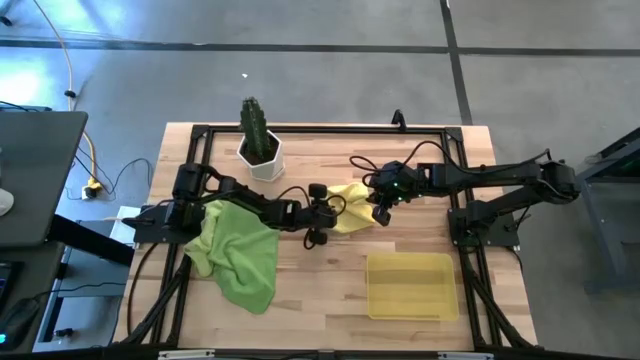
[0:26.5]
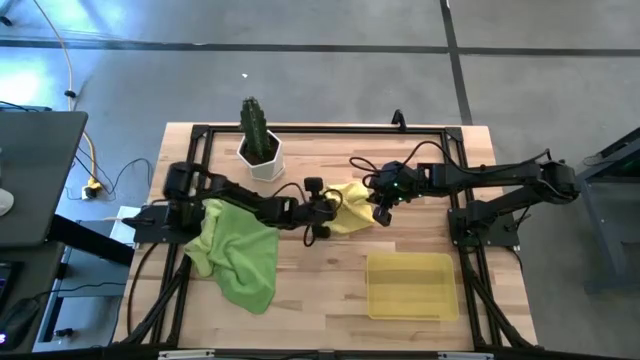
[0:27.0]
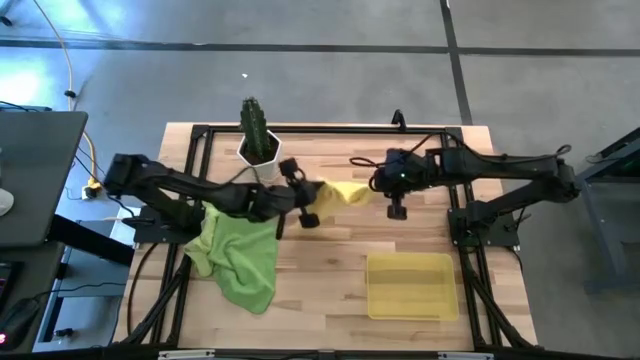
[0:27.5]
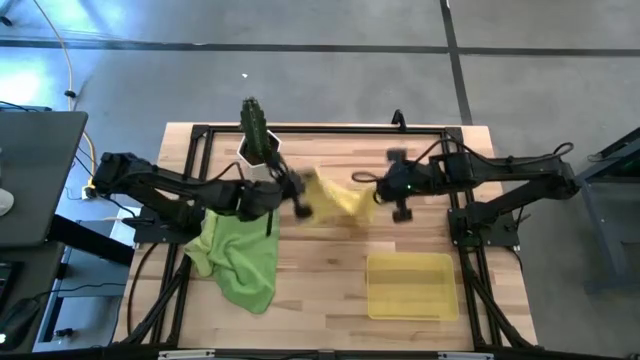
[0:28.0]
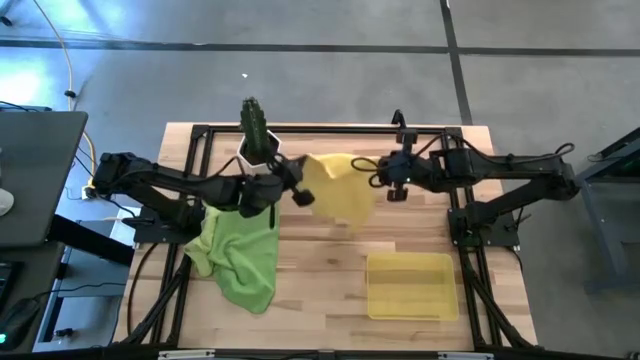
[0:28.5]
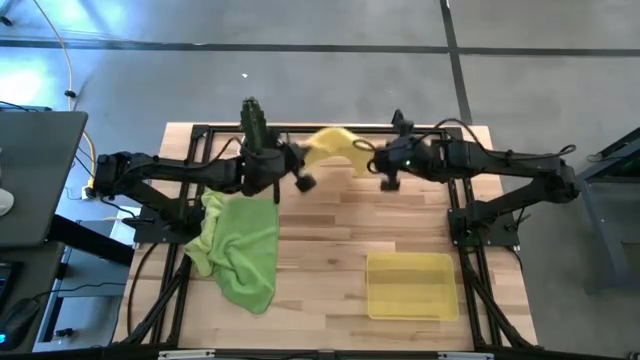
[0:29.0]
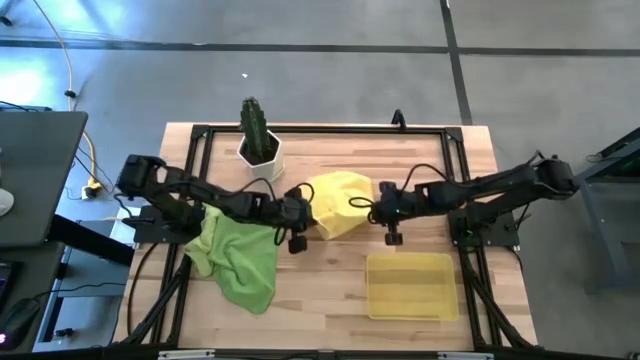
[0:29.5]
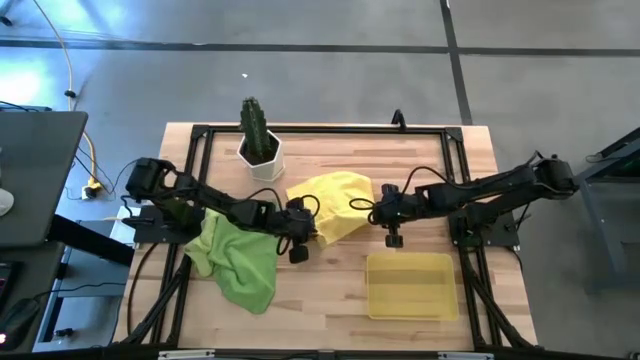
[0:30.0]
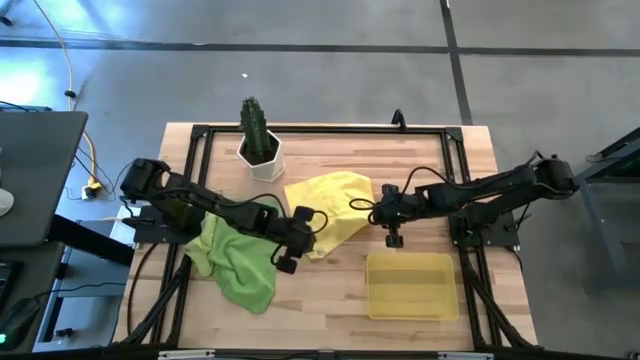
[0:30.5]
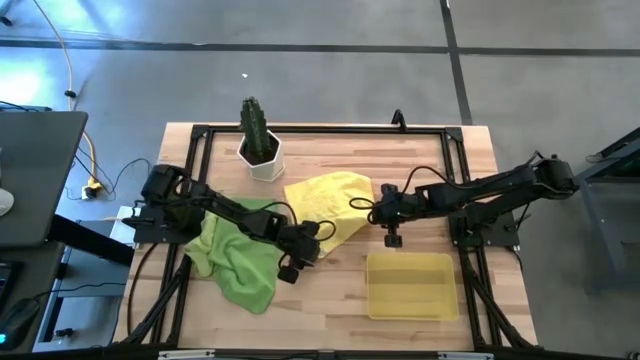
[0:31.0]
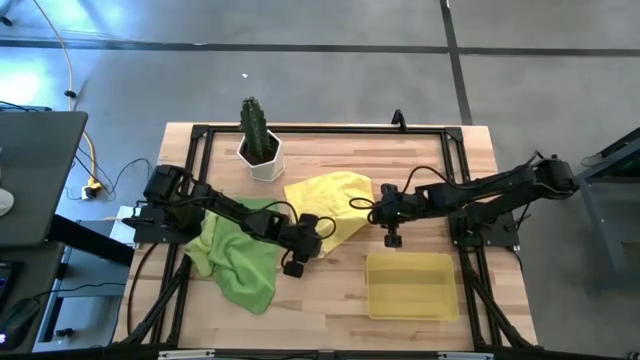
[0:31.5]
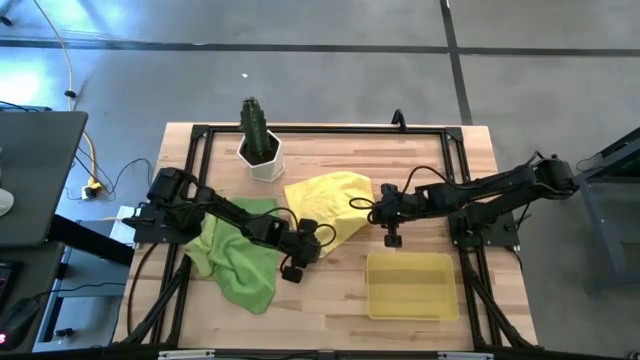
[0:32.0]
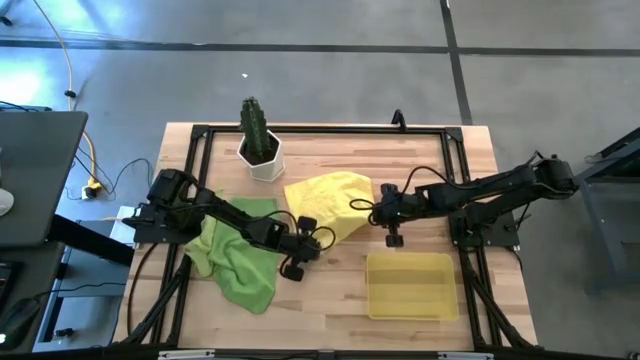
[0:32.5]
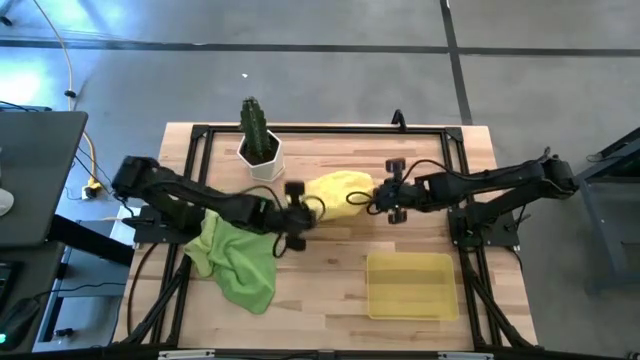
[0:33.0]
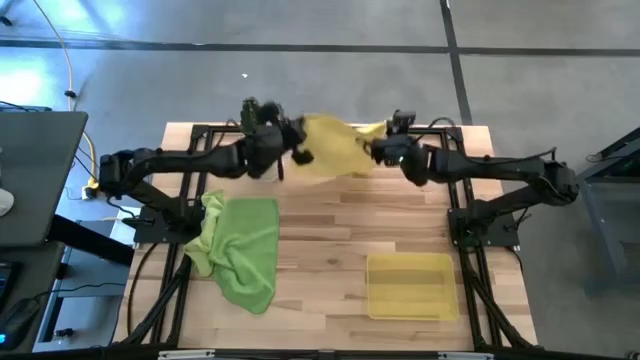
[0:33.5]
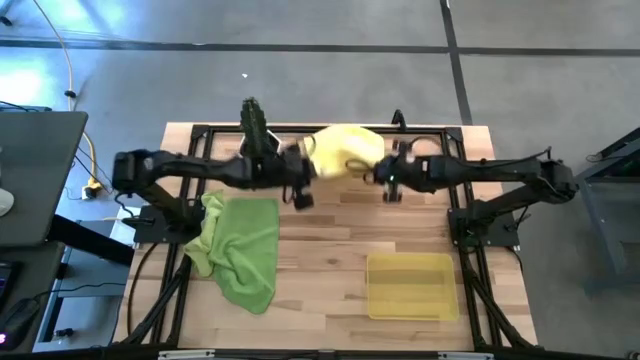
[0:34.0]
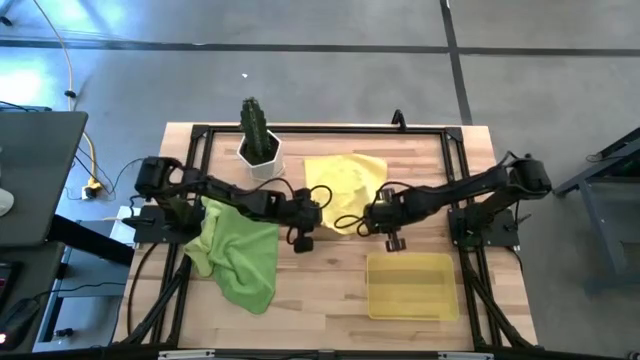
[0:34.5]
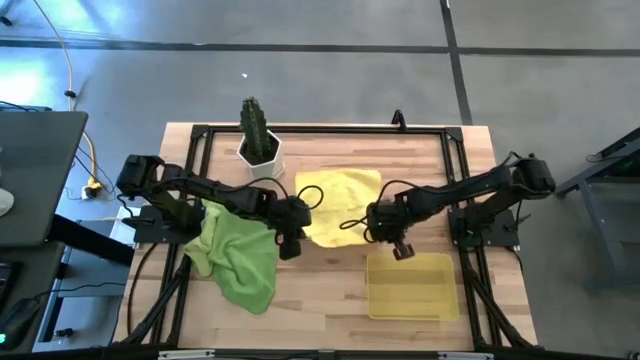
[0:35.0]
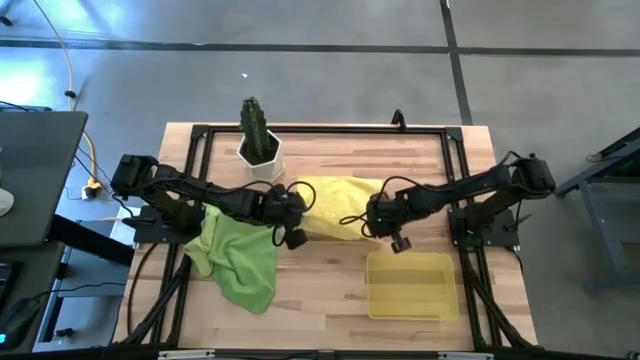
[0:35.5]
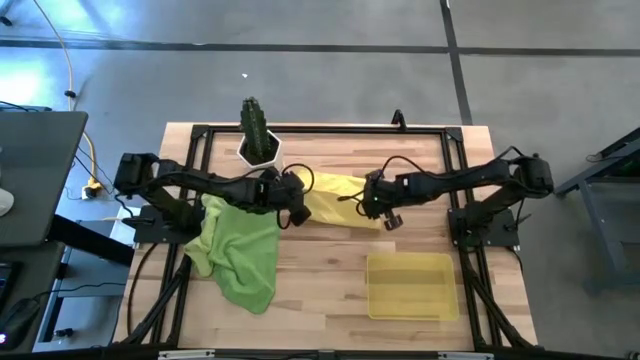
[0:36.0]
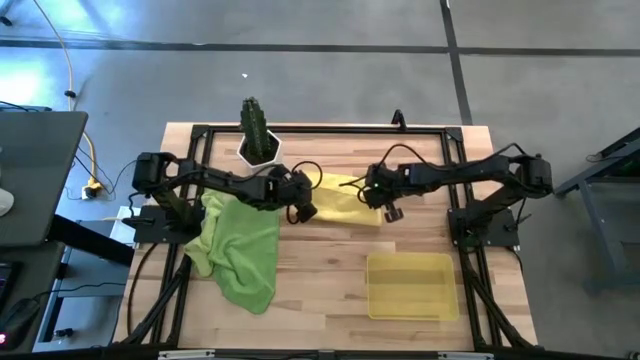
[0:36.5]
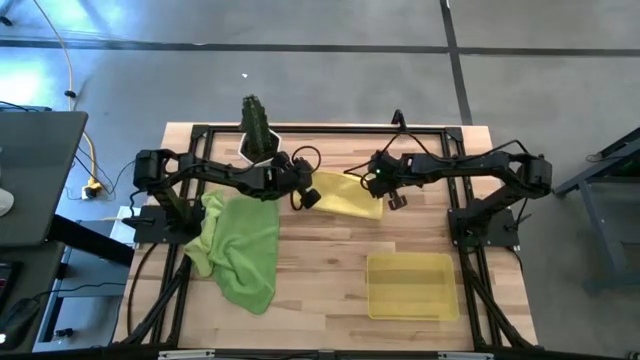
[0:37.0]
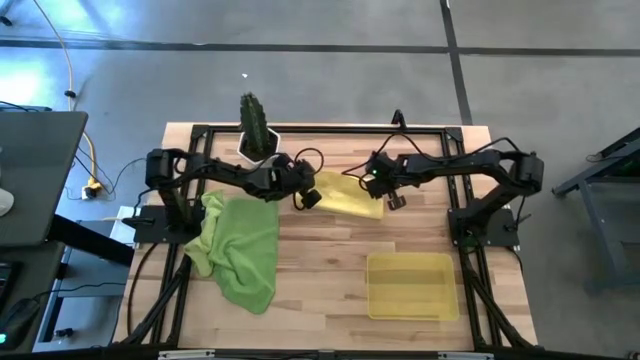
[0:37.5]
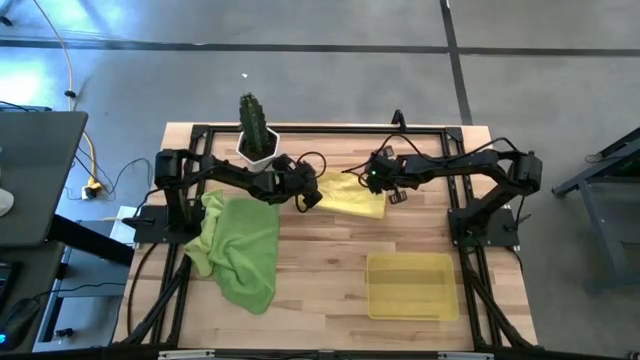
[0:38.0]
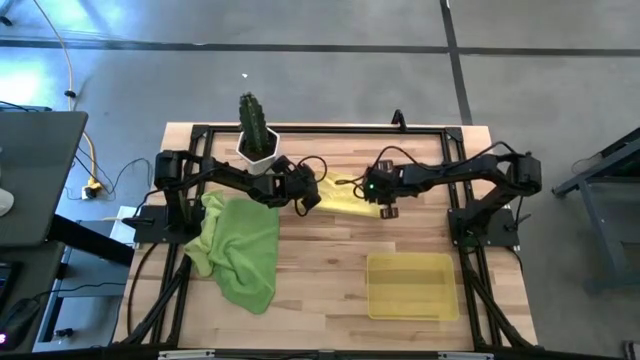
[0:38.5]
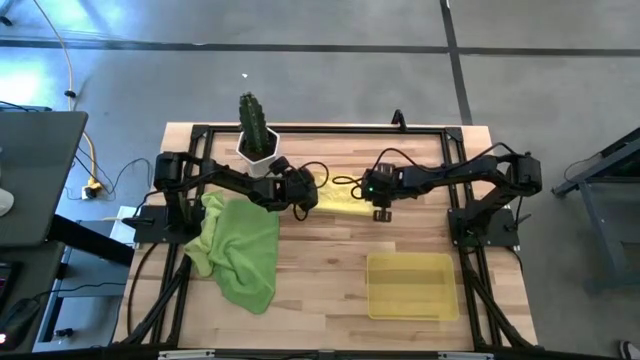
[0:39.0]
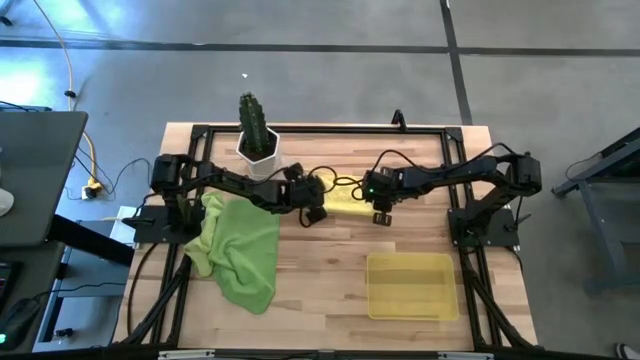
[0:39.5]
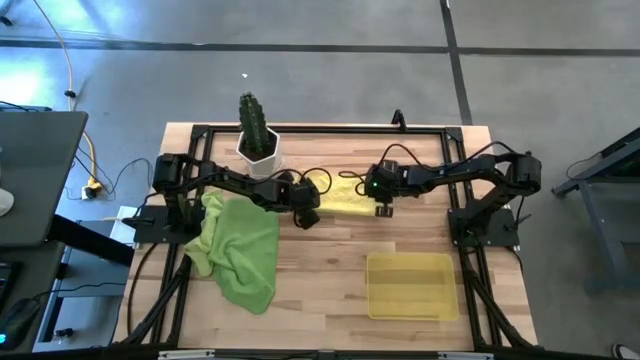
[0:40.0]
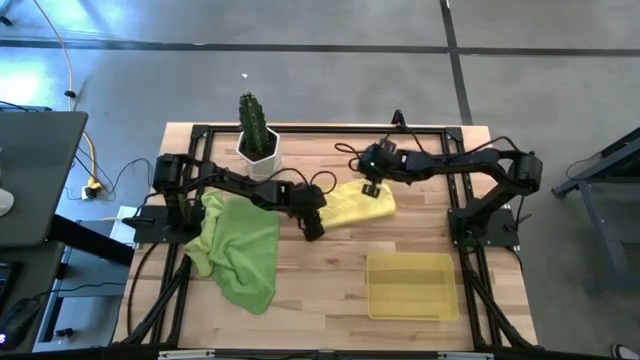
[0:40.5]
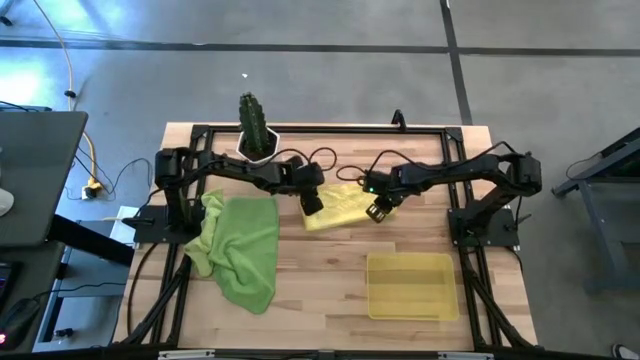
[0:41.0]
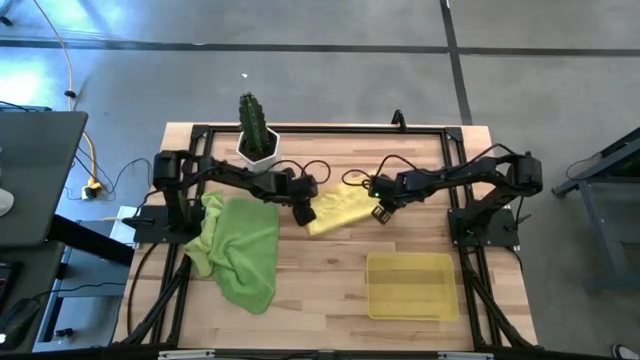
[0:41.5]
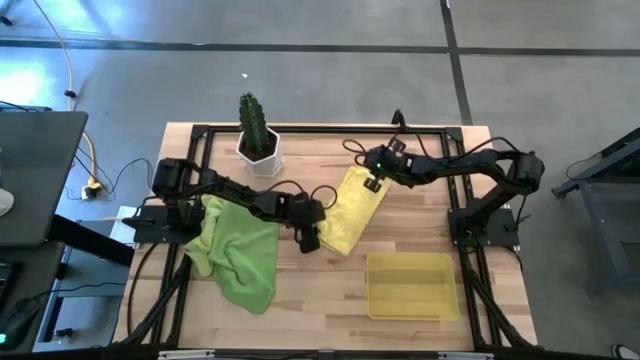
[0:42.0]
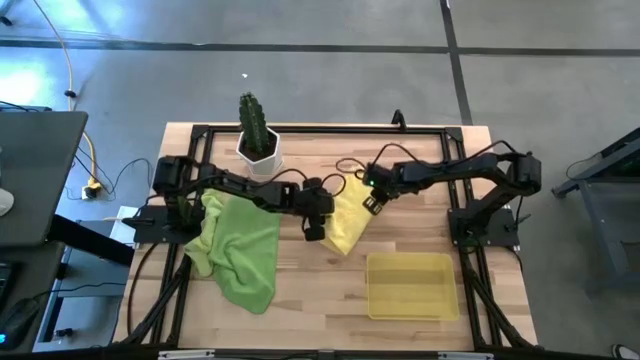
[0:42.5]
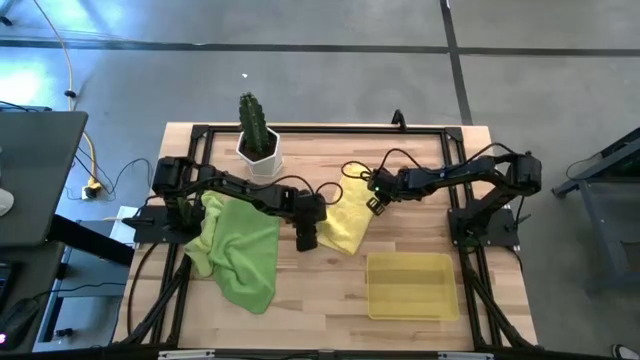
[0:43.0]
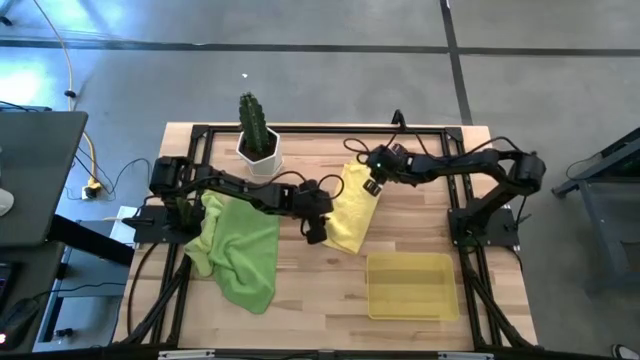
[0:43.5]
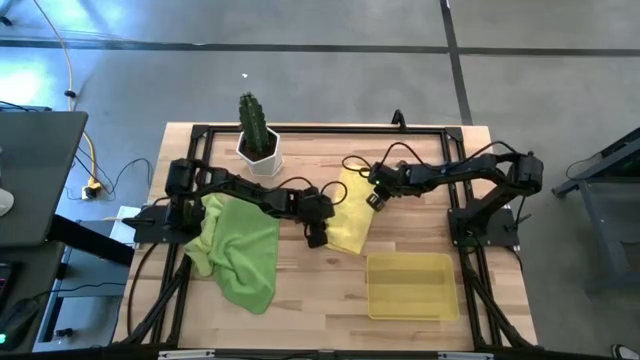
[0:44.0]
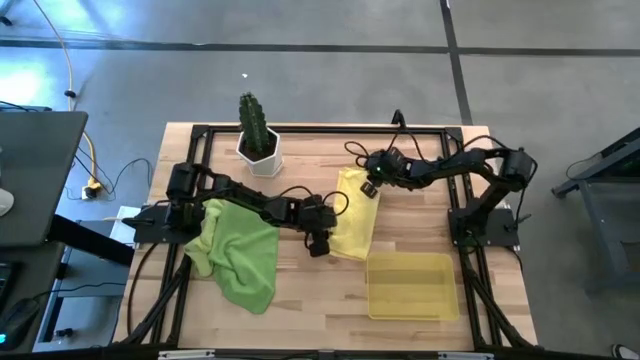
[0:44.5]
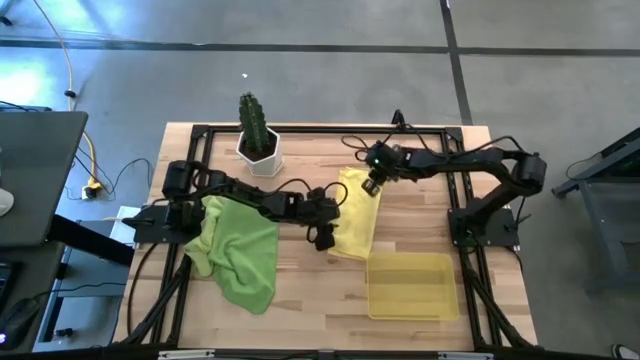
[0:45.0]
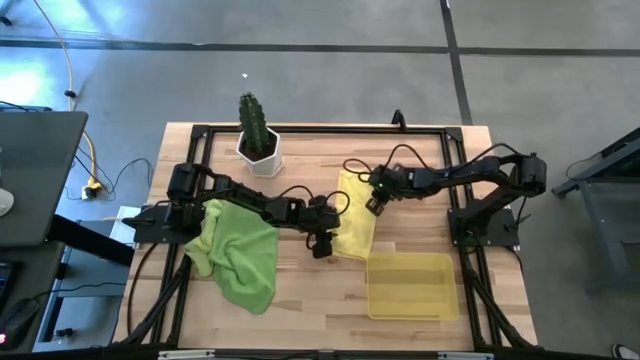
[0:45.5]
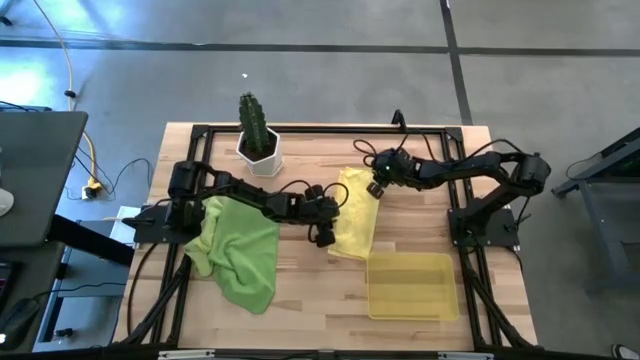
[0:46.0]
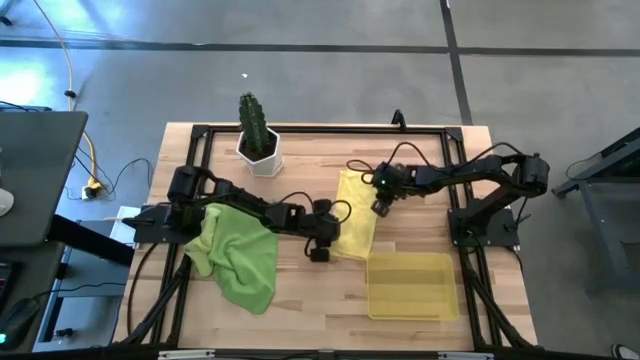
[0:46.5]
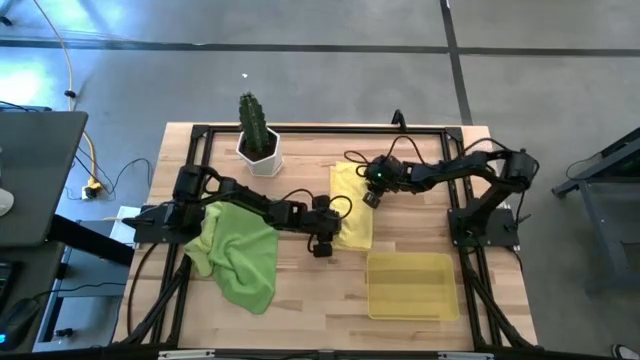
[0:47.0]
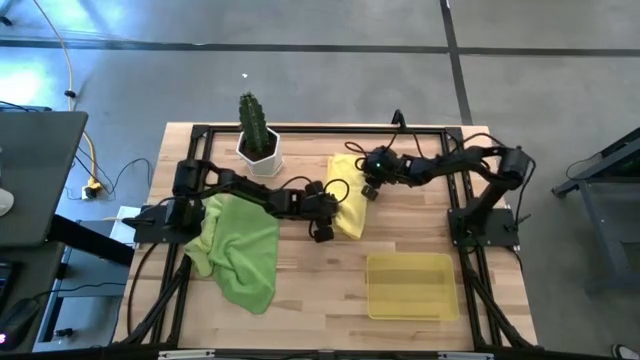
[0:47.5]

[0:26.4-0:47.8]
Task: Roll microfiber towels into tight, uniform cylinder then place into a basket
Fold the yellow towel
